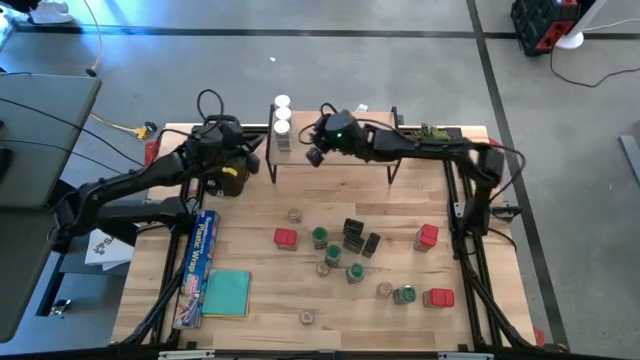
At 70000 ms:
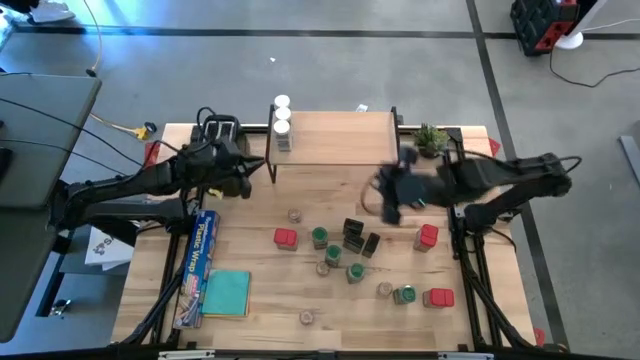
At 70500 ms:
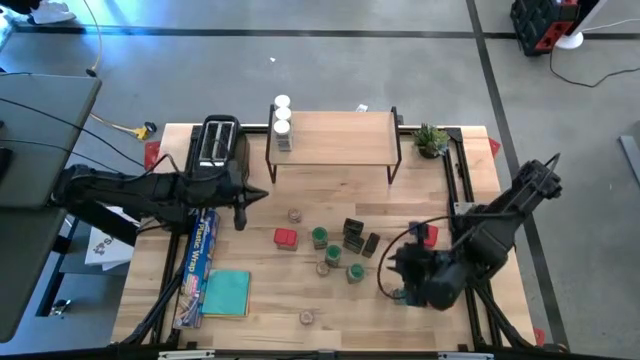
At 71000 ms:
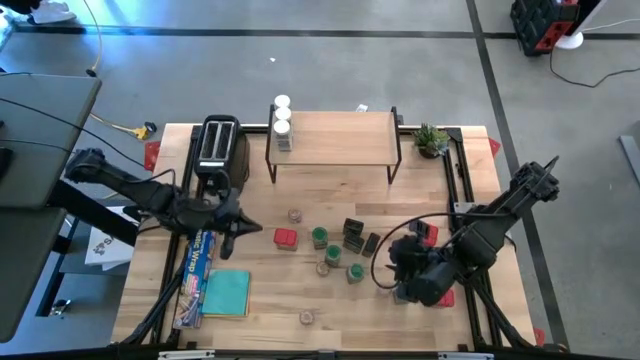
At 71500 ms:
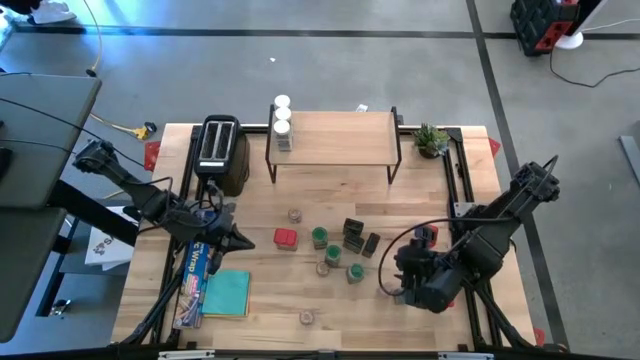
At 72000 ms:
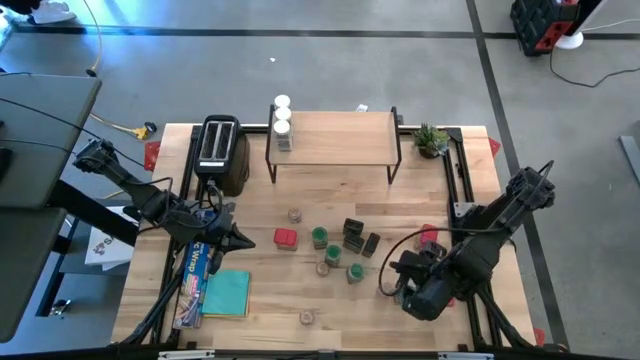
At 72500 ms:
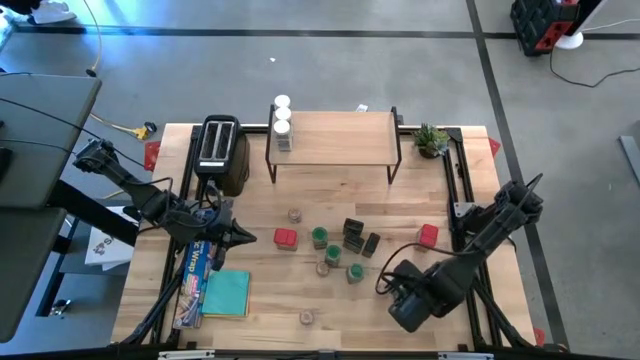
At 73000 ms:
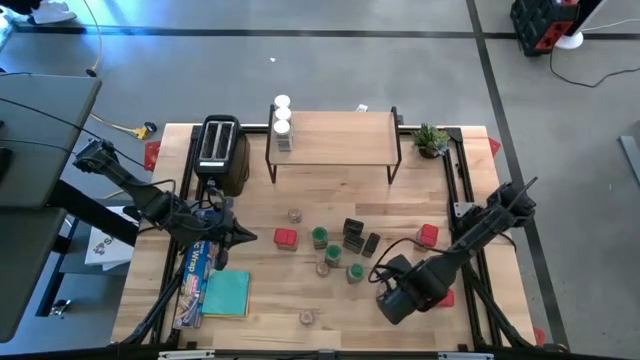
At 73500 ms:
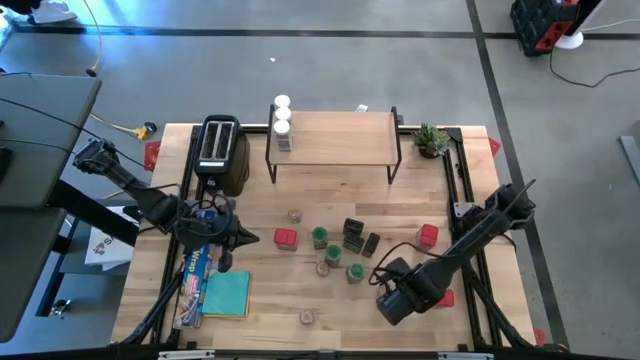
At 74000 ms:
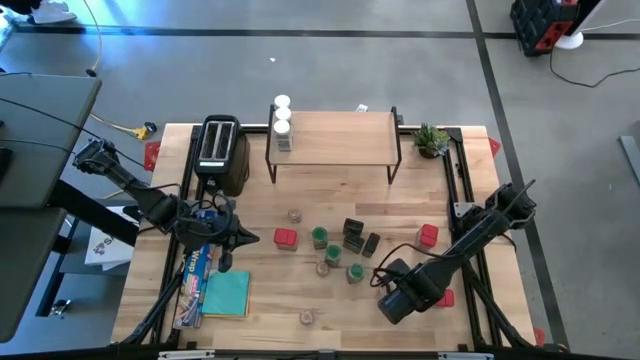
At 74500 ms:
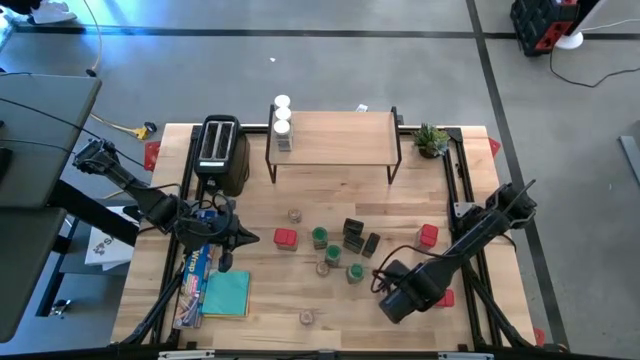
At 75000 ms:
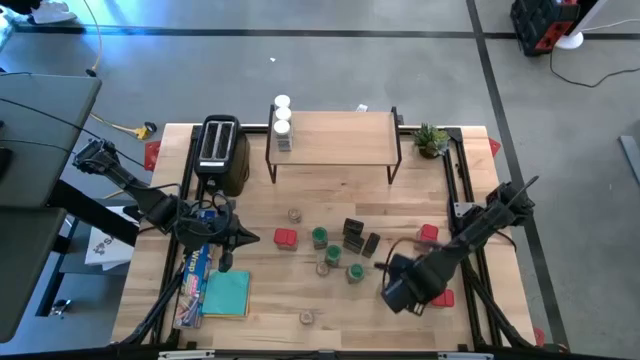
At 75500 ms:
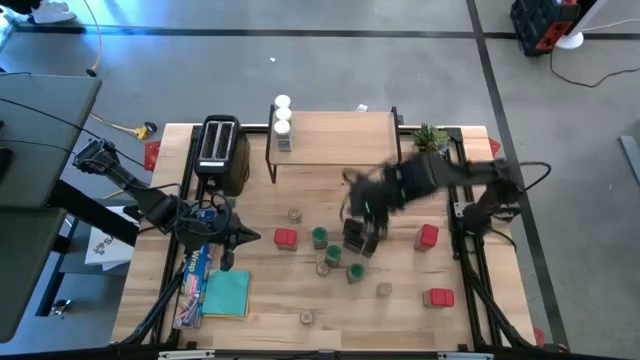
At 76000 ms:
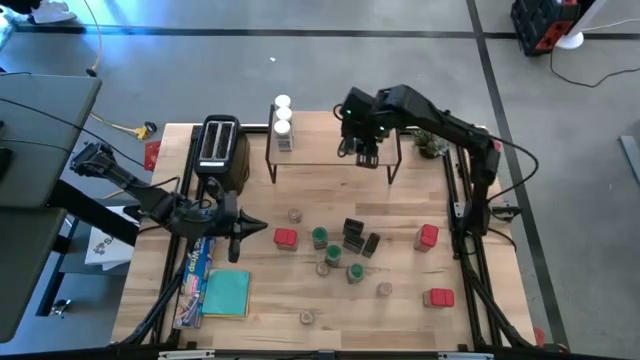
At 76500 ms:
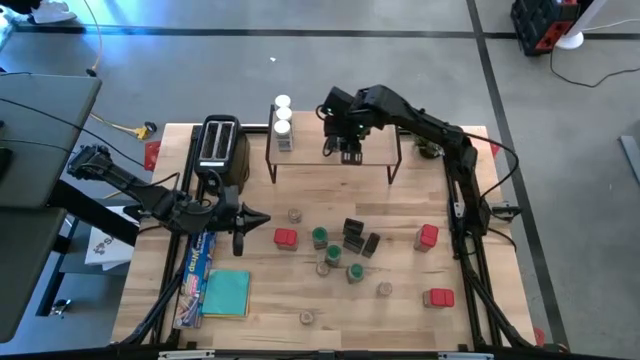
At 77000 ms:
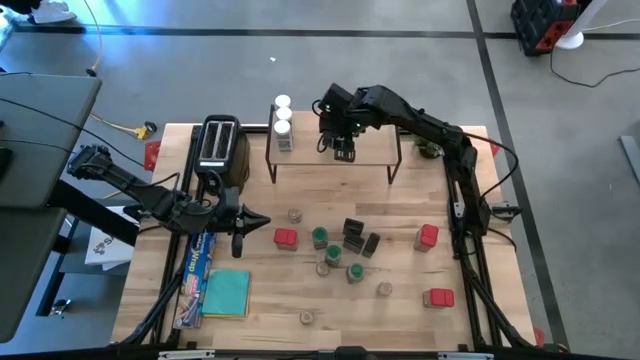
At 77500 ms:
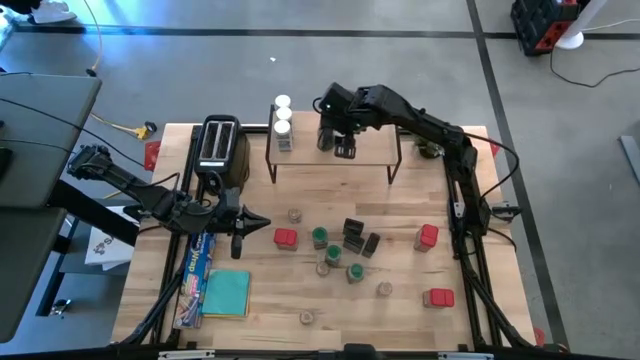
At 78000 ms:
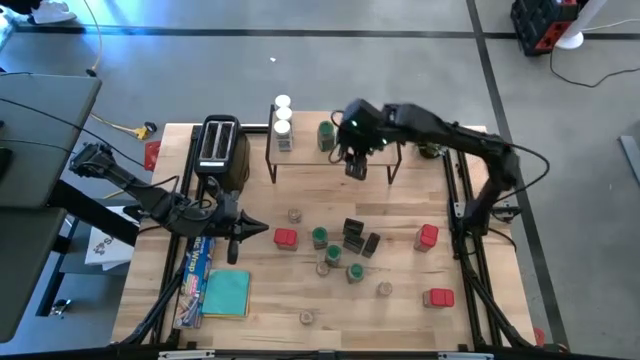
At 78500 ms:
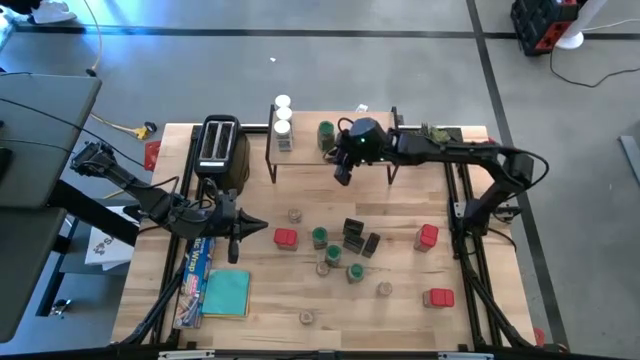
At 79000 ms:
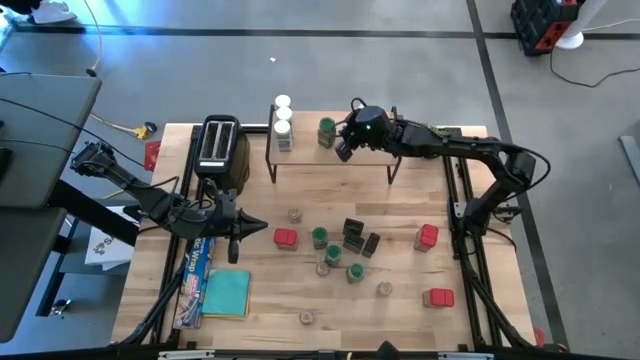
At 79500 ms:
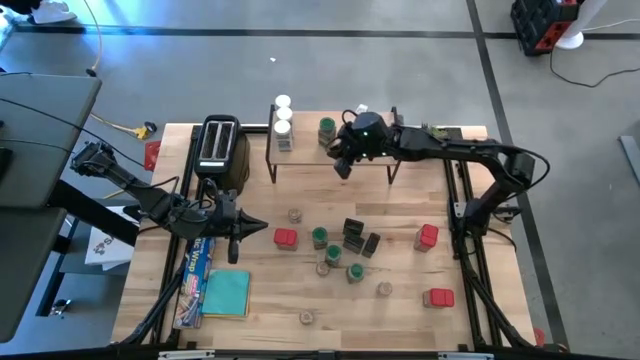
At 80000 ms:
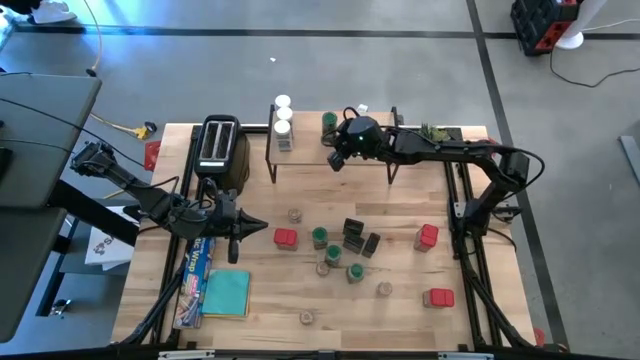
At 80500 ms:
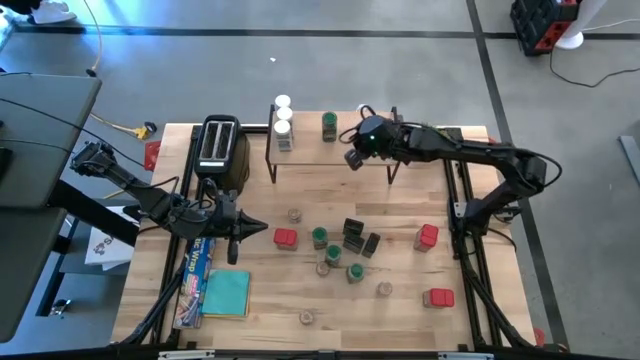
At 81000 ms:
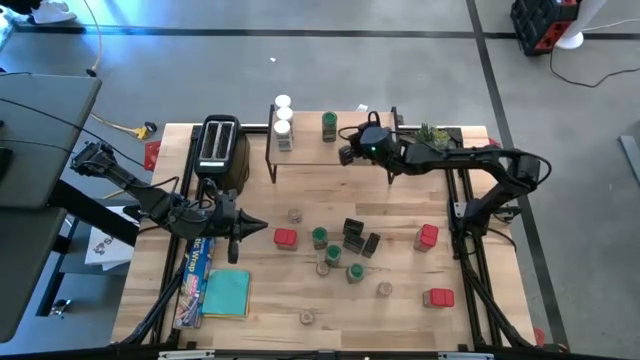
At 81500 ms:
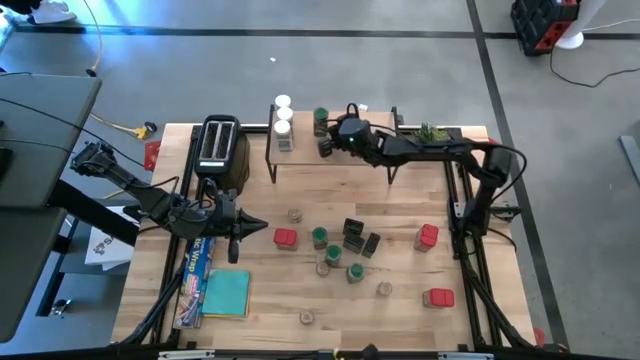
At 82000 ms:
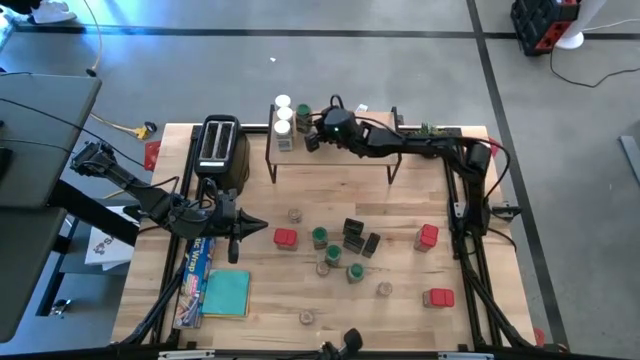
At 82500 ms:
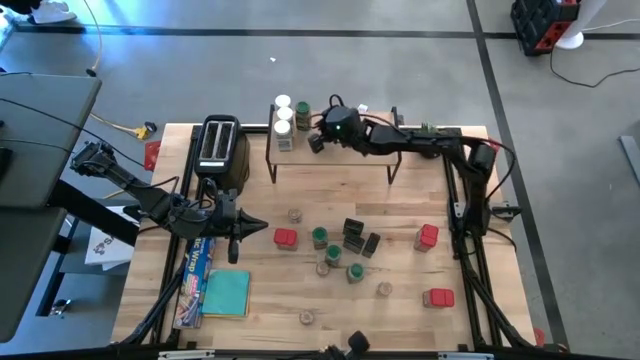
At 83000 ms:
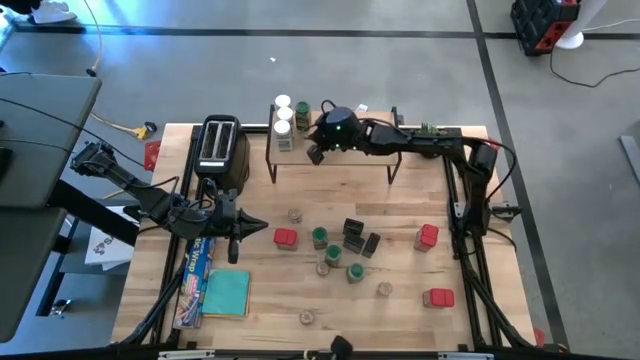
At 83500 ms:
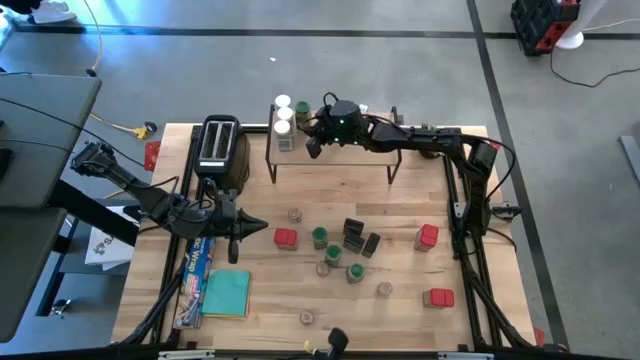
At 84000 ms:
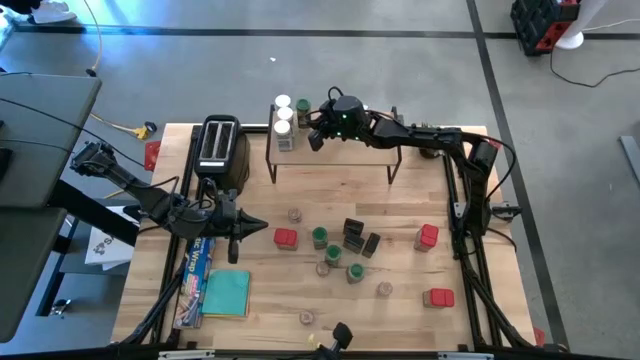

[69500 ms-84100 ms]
Task: Shelf spices
Put the right green seasoning bottle on the shelf

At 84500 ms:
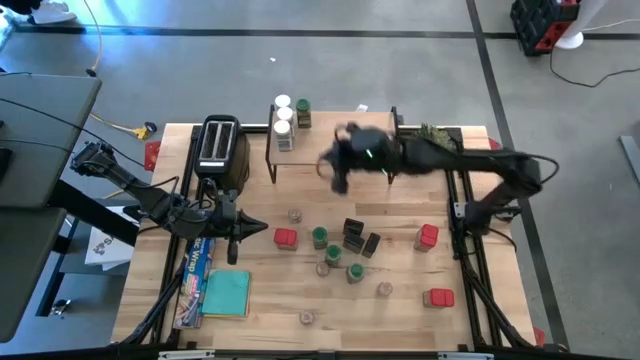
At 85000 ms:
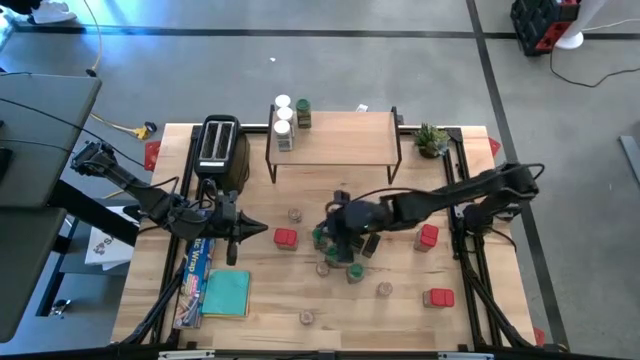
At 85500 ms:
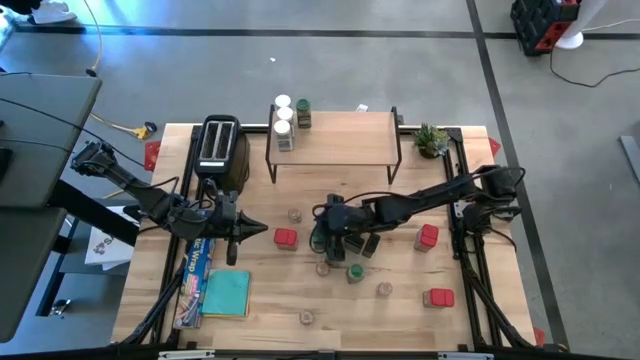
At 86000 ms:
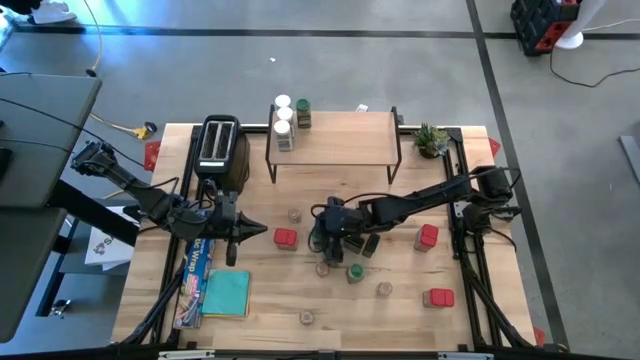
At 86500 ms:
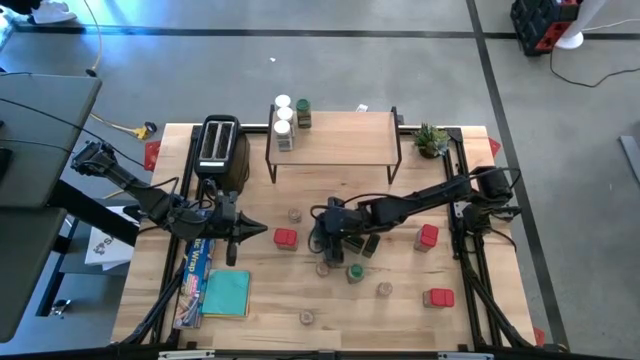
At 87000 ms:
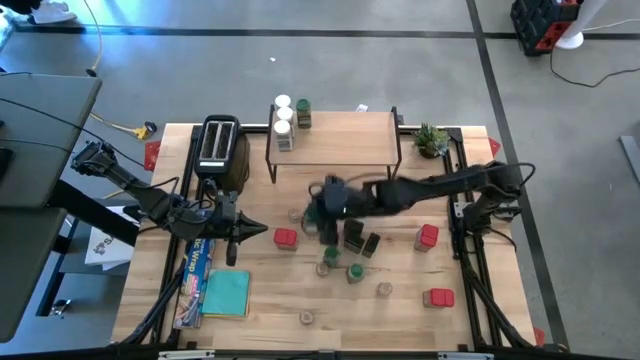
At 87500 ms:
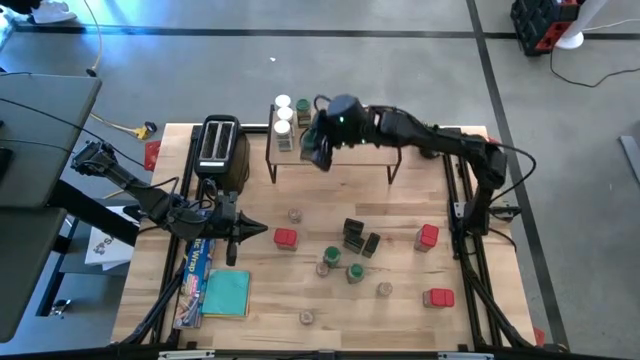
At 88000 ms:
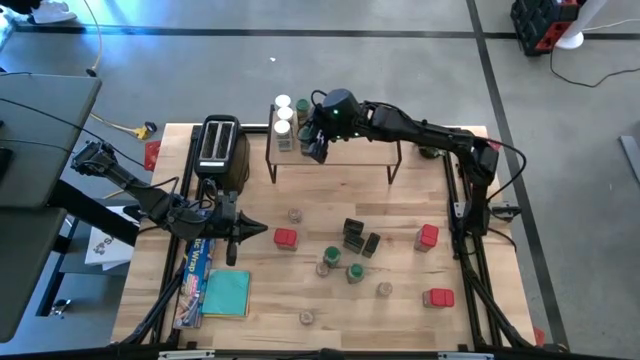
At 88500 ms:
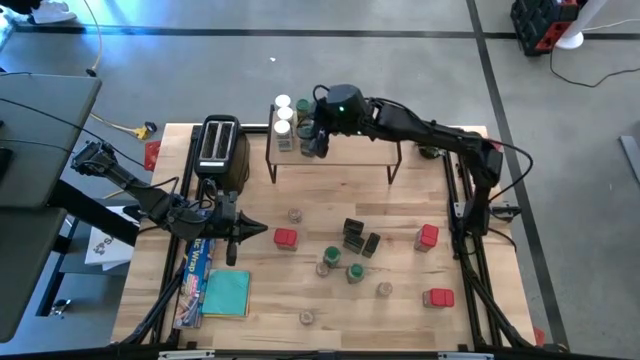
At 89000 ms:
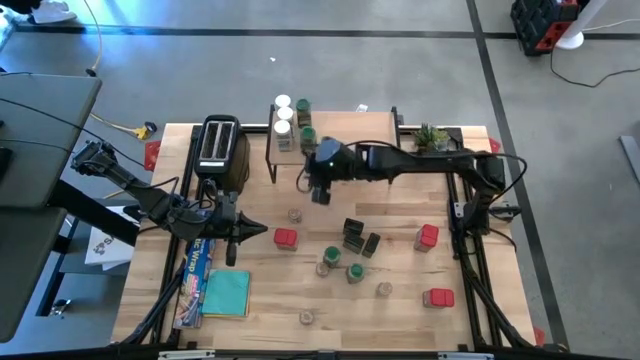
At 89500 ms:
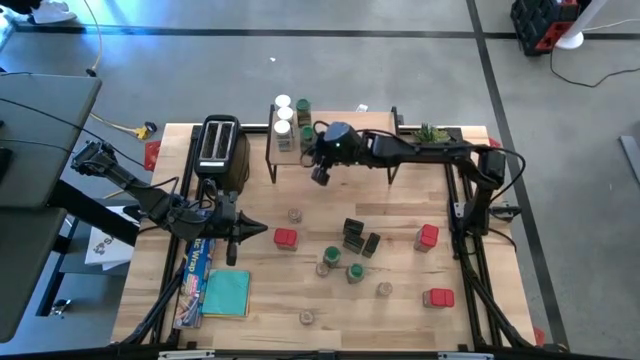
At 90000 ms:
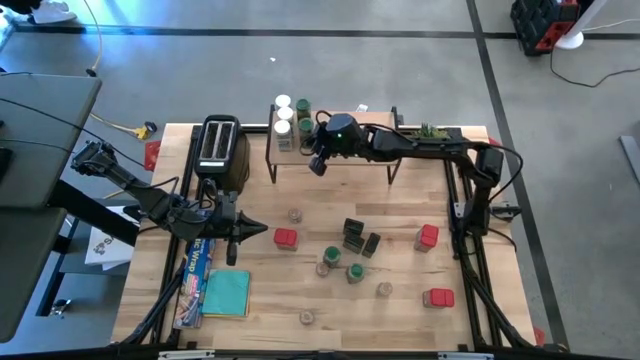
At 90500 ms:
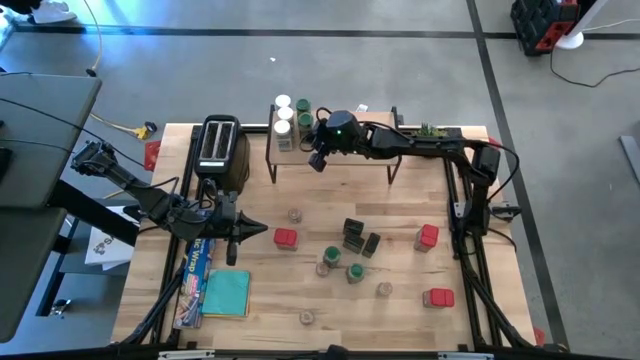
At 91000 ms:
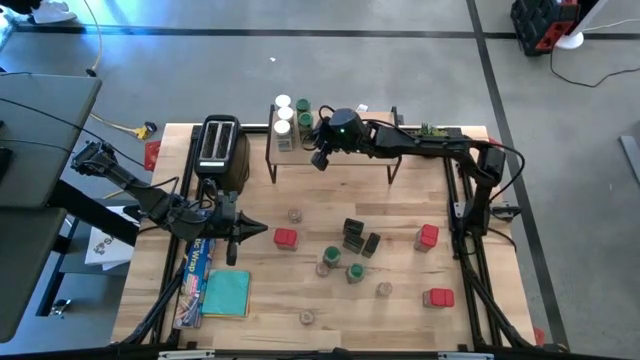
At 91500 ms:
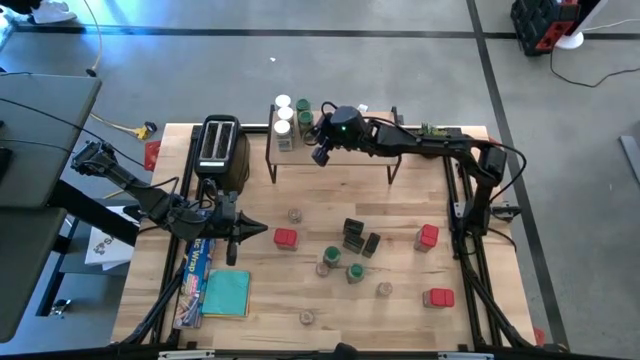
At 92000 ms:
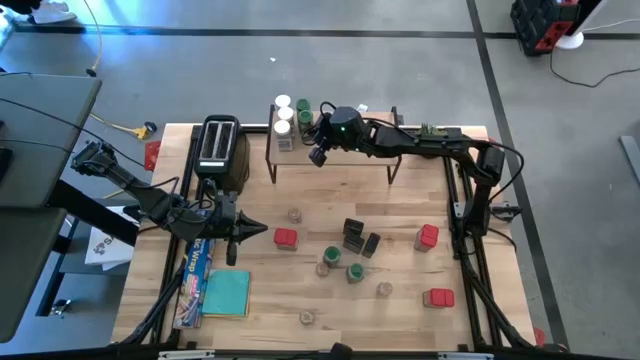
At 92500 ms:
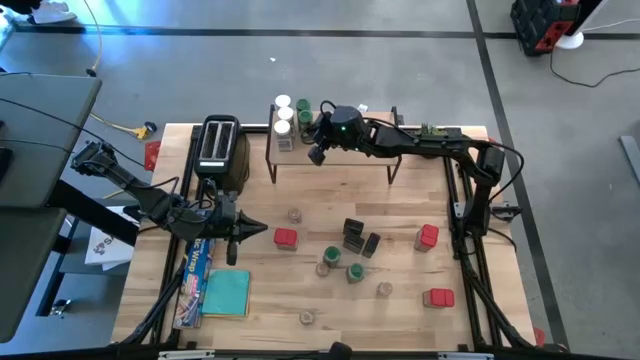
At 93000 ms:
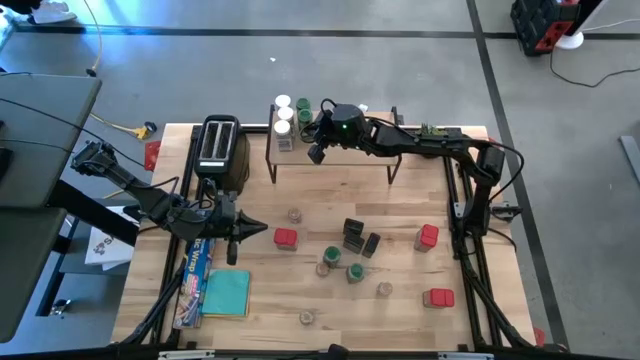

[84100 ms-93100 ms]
Put the top green seasoning bottle on the shelf aligned with the other green seasoning bottle
